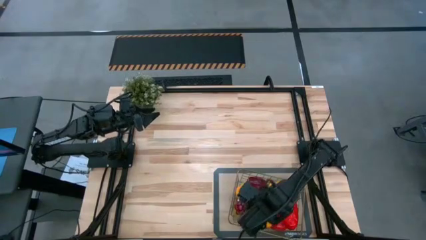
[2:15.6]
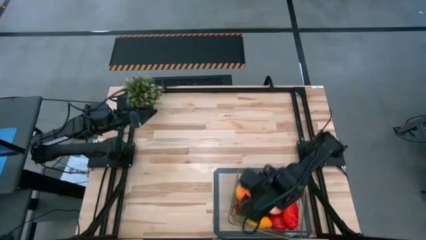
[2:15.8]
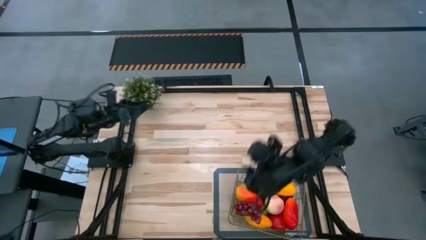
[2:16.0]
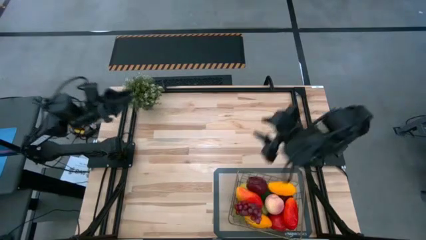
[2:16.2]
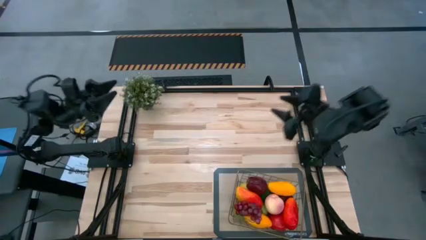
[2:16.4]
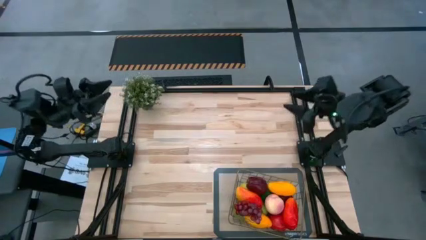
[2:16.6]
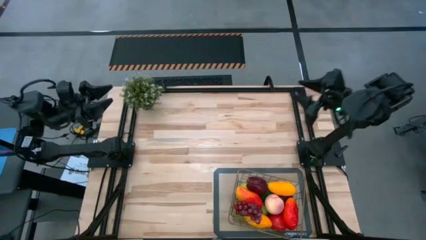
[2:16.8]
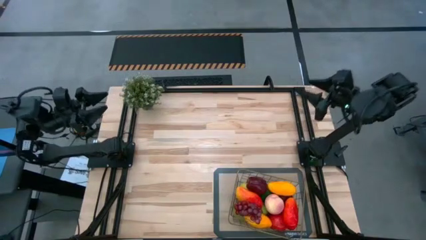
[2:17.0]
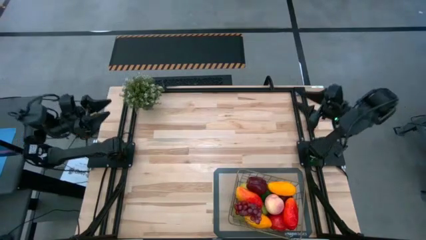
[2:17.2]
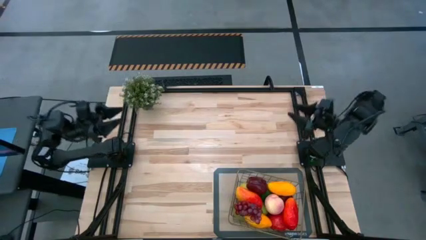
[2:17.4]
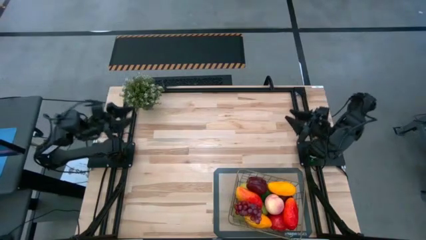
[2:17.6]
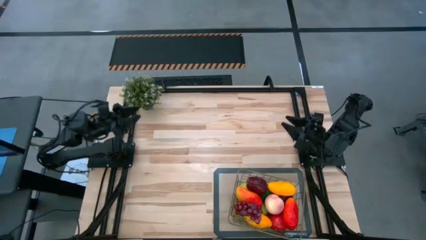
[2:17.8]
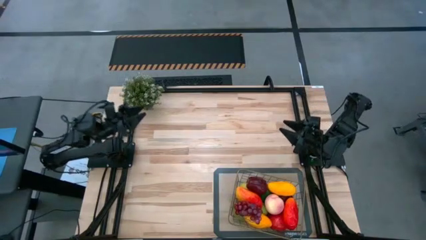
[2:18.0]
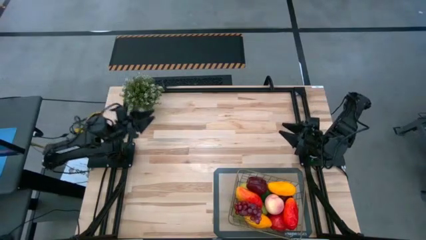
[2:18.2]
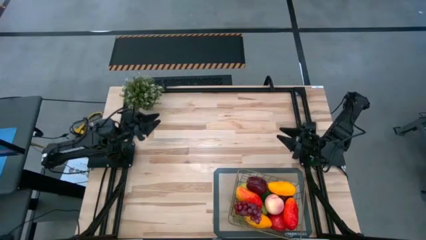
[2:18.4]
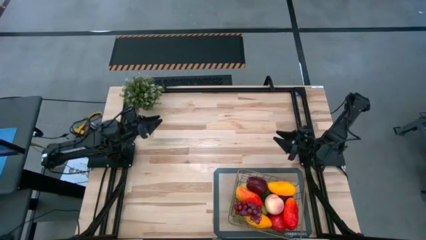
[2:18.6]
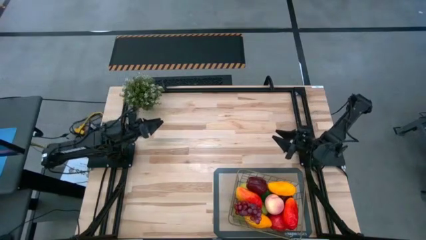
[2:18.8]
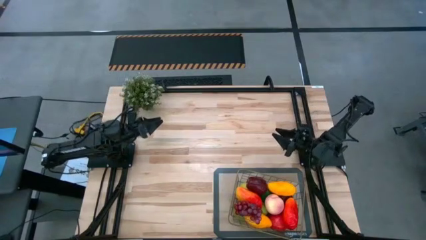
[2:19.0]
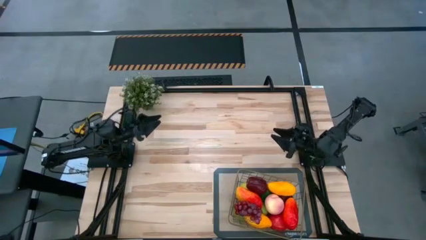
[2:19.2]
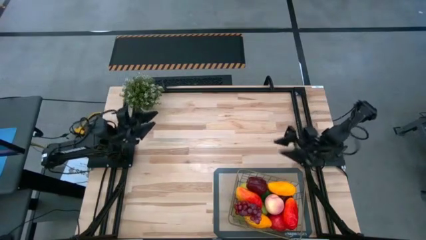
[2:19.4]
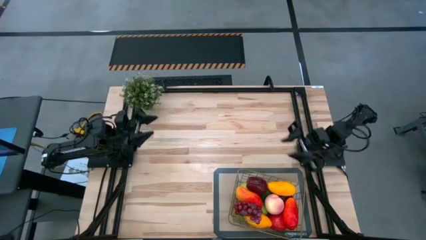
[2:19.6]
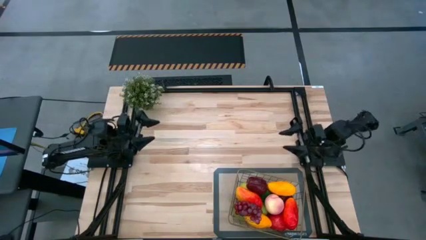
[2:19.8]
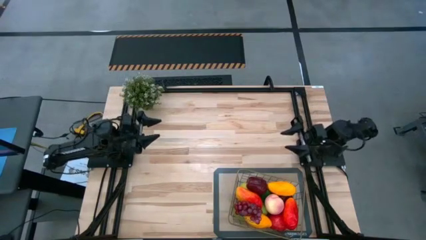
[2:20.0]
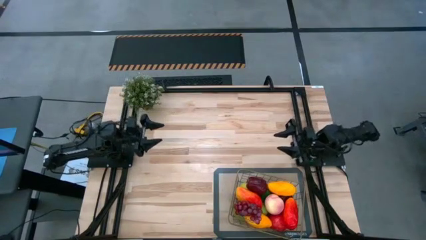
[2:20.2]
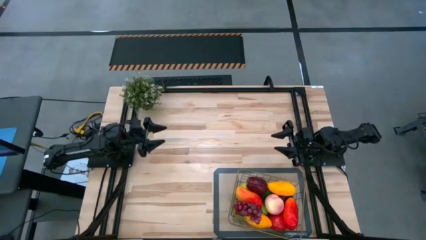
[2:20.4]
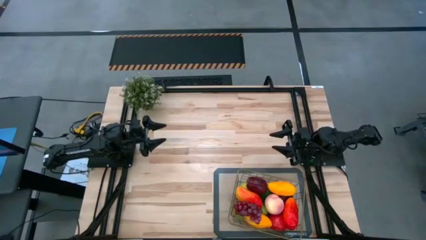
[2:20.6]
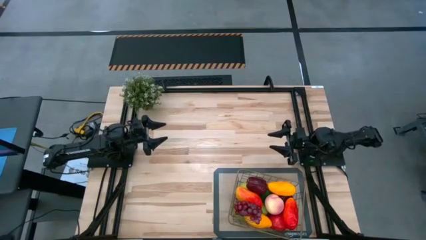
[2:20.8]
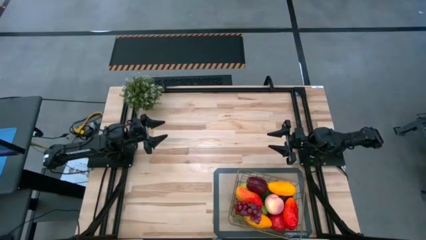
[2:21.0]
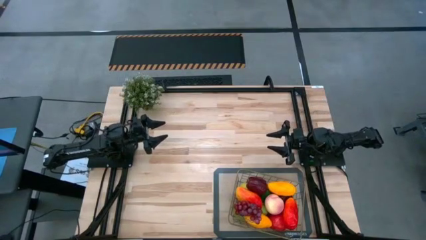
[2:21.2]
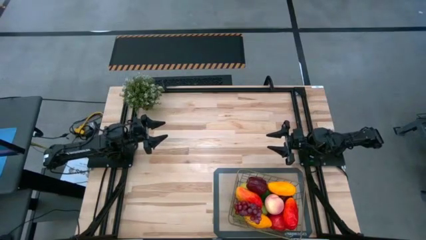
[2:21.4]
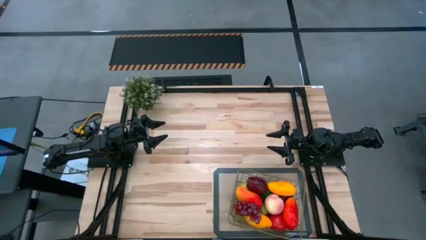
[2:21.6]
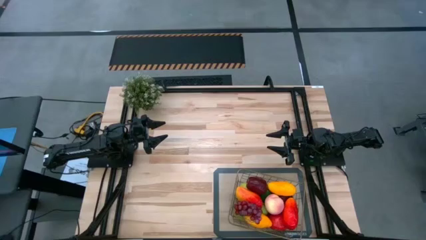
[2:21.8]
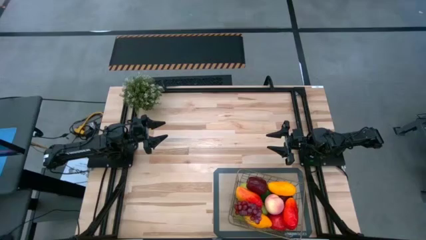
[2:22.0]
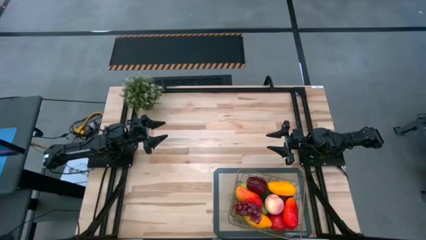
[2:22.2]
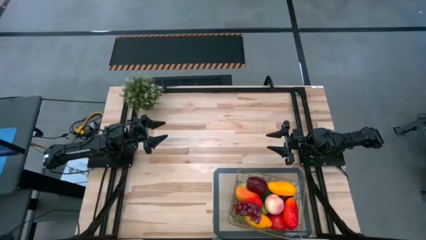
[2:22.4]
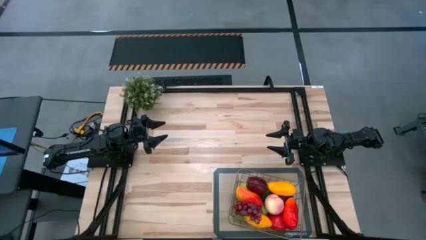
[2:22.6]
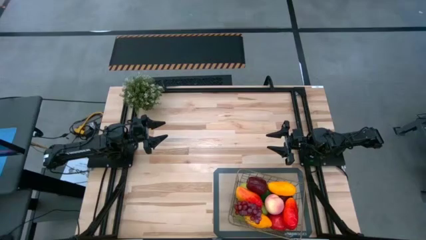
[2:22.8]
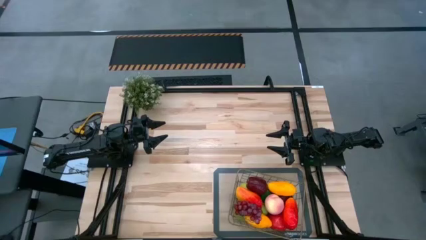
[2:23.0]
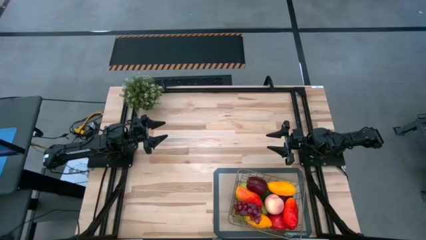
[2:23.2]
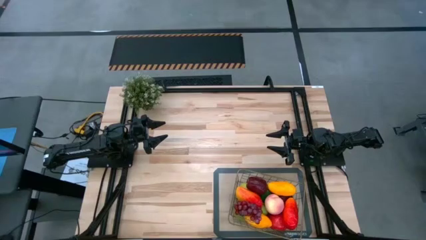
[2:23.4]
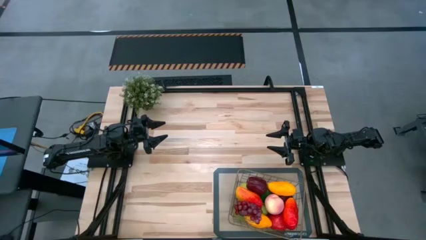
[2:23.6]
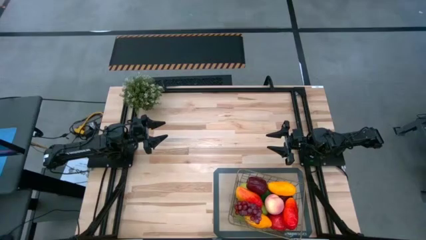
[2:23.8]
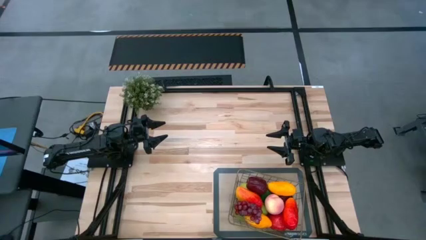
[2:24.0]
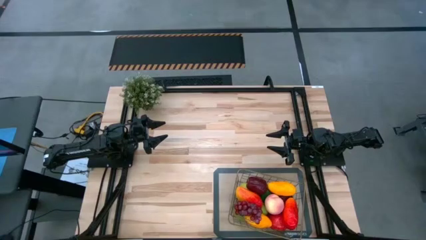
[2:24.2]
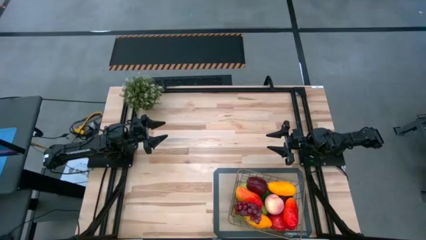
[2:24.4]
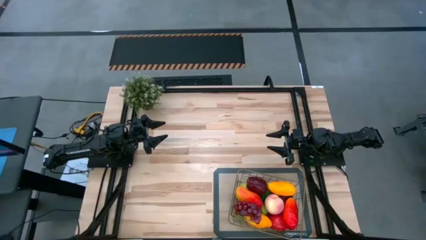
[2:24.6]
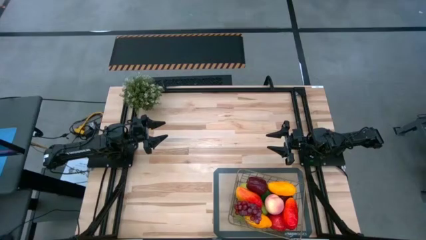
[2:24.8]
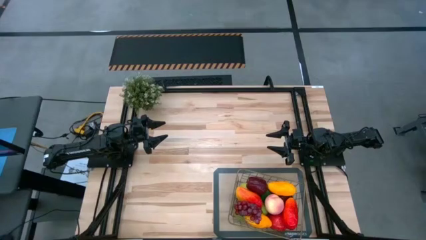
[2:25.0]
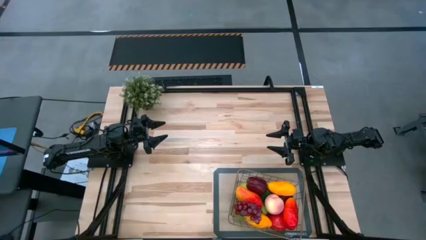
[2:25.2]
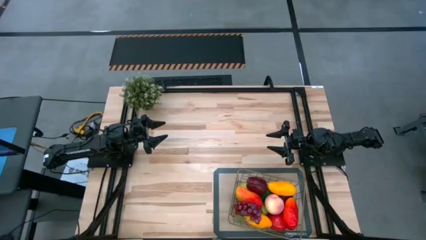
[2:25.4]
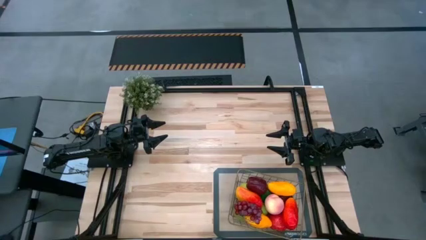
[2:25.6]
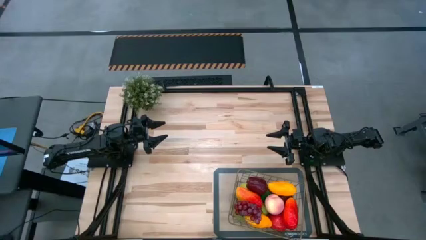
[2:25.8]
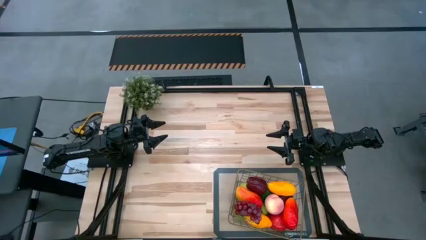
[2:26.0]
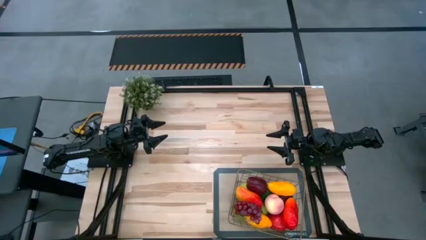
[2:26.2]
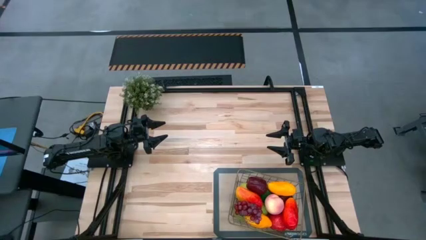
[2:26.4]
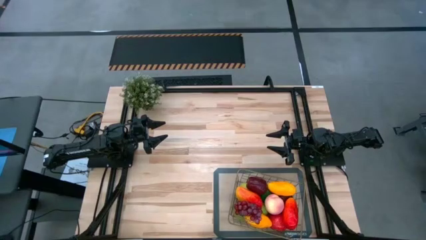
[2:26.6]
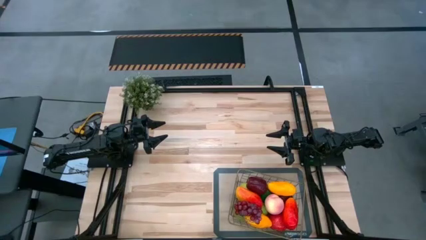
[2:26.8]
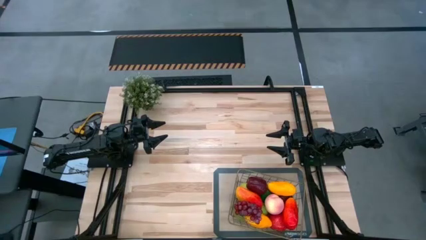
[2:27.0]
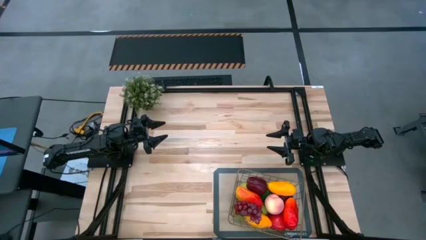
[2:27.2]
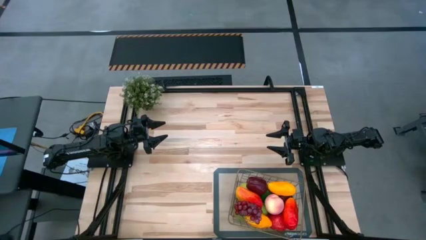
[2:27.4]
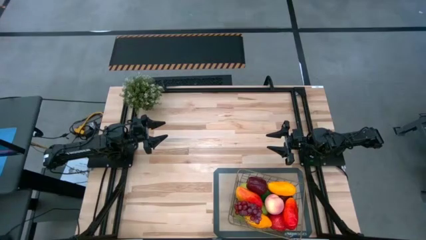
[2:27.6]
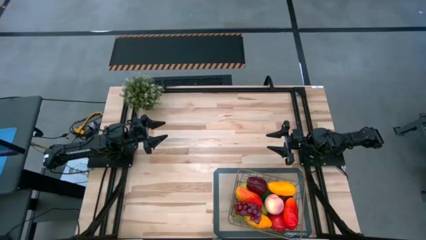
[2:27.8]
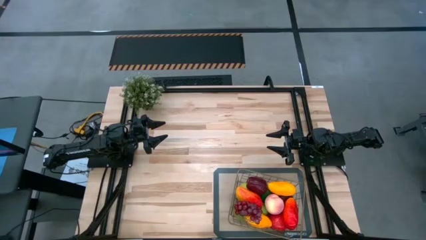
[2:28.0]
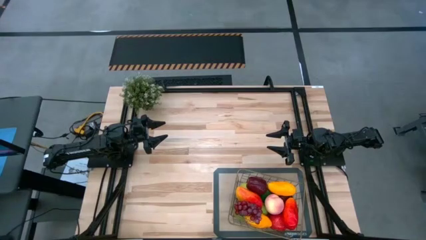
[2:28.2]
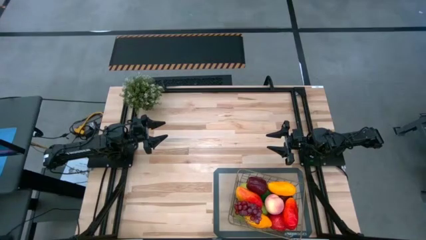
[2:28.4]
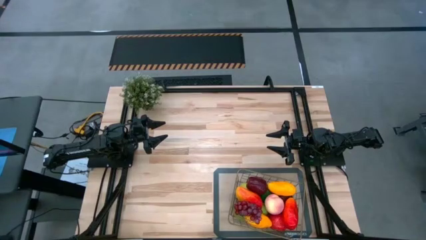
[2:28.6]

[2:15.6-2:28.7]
Task: Build produce basket
Return to Home Position
